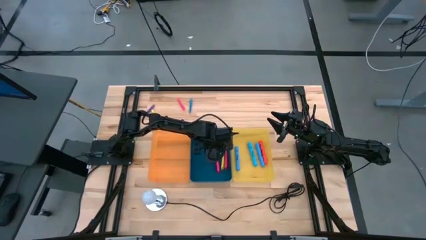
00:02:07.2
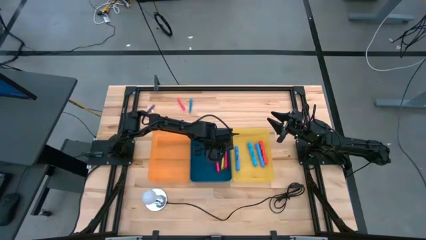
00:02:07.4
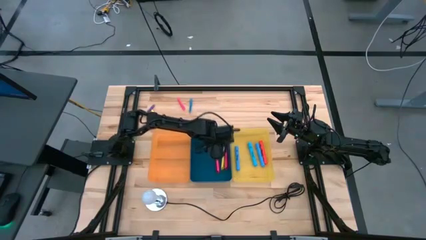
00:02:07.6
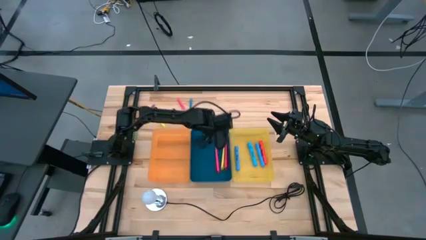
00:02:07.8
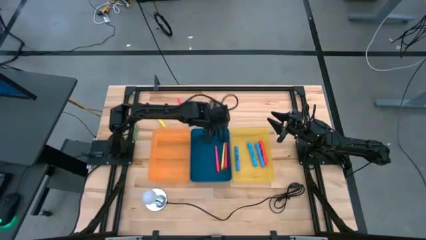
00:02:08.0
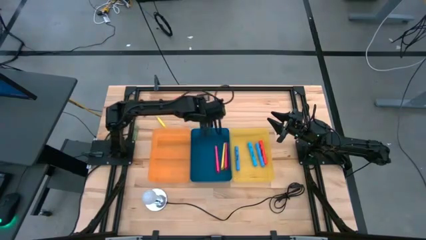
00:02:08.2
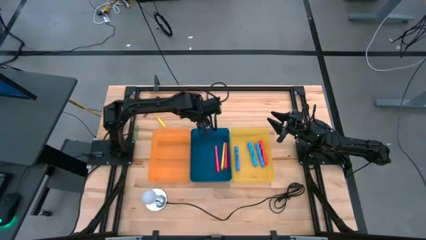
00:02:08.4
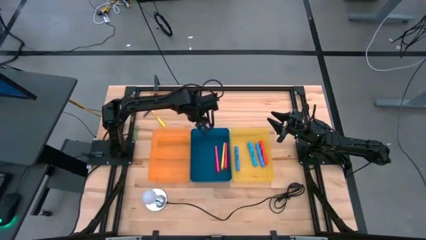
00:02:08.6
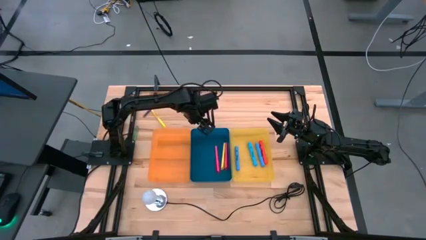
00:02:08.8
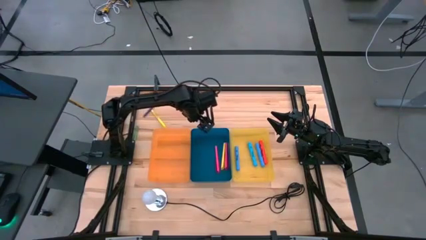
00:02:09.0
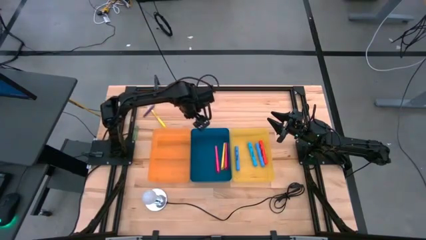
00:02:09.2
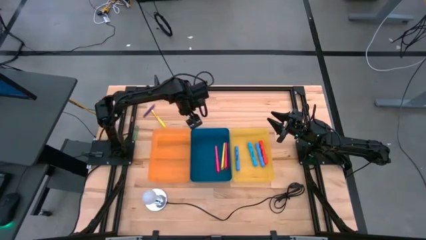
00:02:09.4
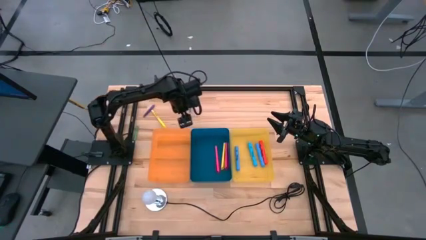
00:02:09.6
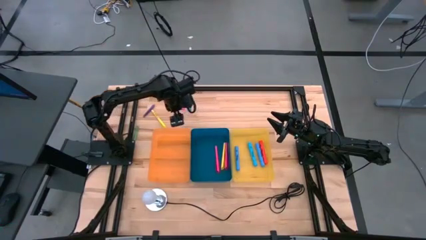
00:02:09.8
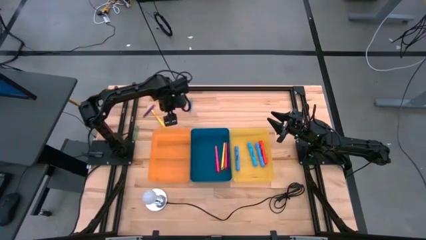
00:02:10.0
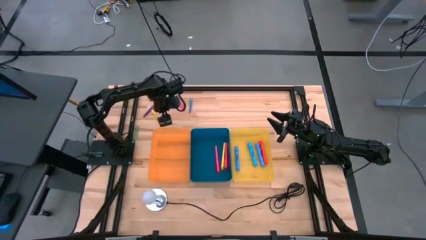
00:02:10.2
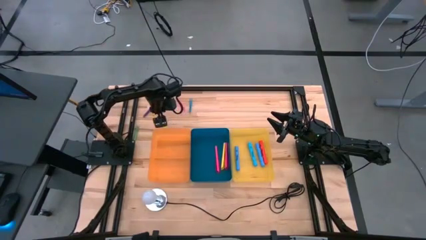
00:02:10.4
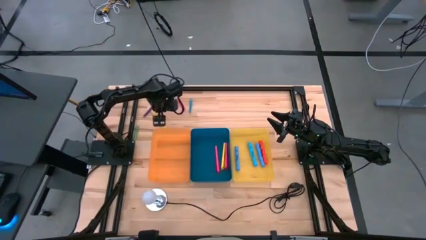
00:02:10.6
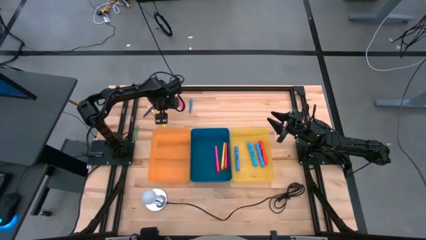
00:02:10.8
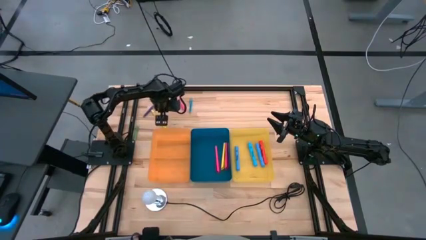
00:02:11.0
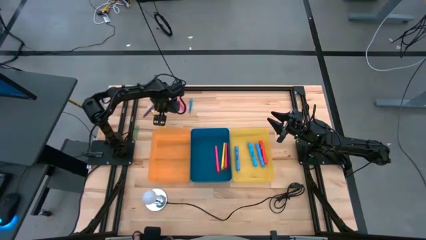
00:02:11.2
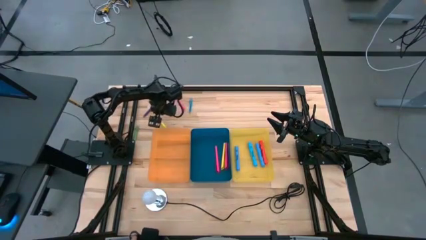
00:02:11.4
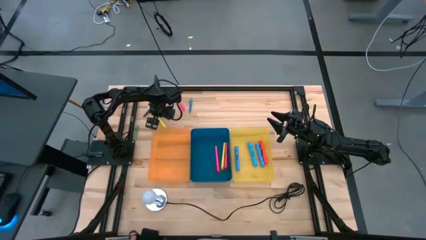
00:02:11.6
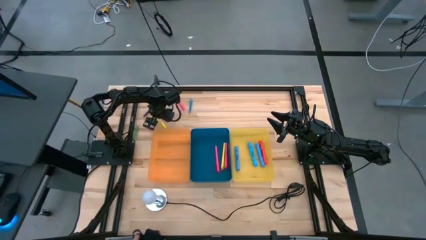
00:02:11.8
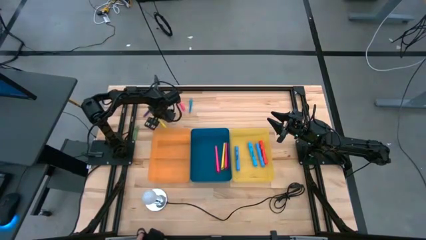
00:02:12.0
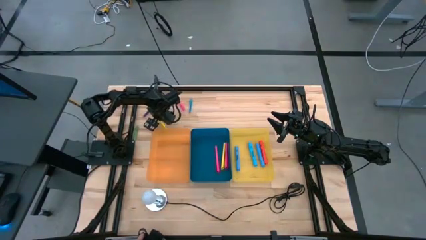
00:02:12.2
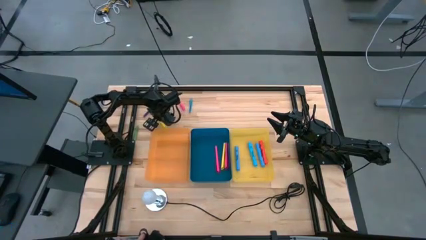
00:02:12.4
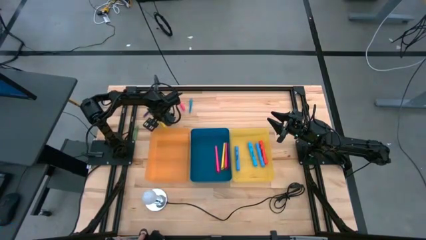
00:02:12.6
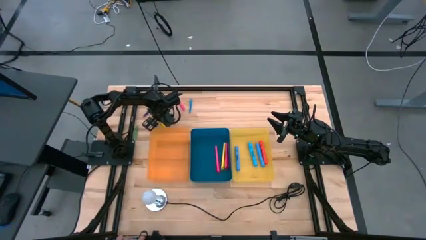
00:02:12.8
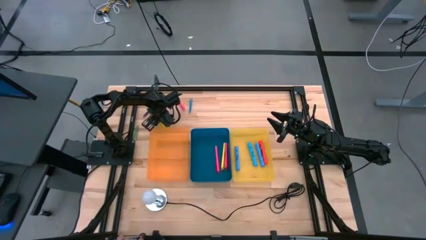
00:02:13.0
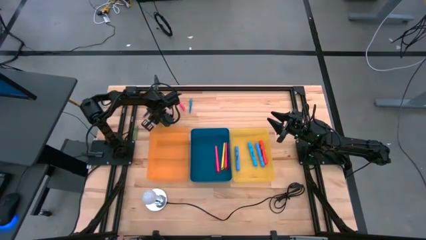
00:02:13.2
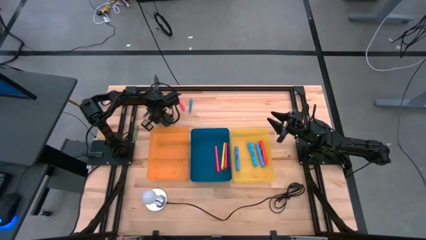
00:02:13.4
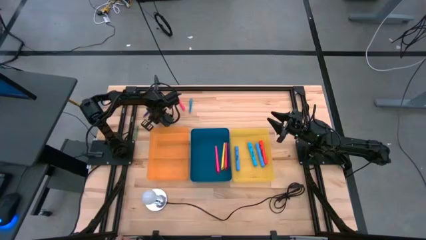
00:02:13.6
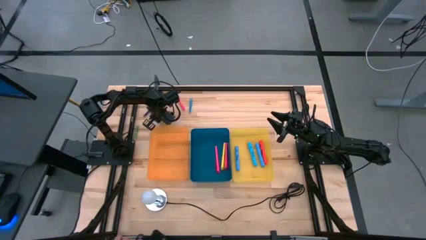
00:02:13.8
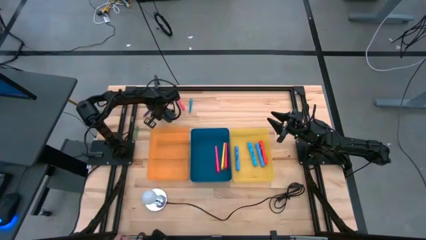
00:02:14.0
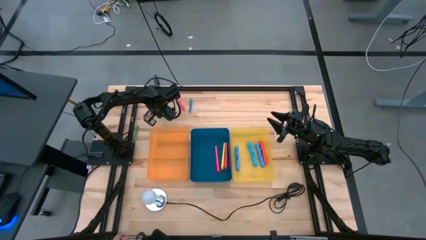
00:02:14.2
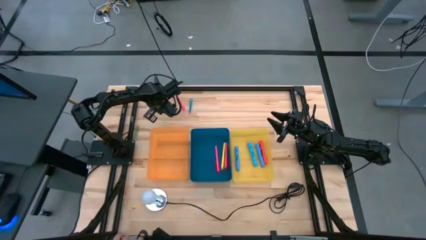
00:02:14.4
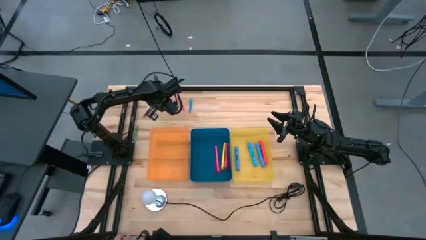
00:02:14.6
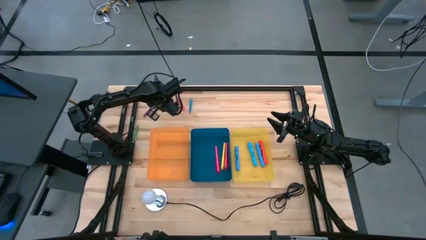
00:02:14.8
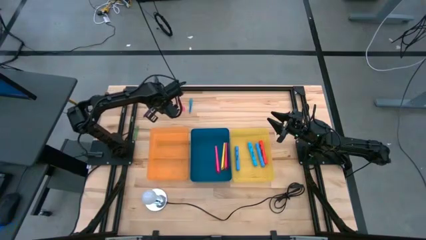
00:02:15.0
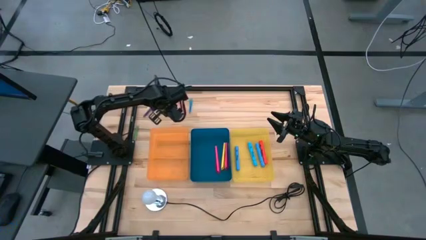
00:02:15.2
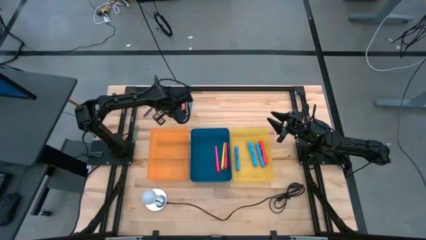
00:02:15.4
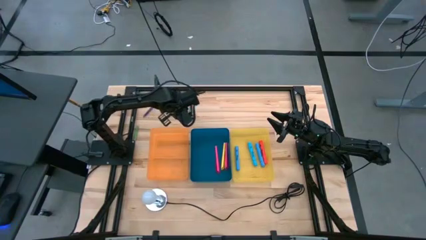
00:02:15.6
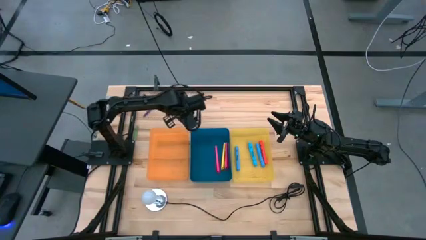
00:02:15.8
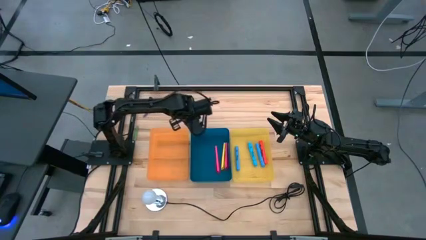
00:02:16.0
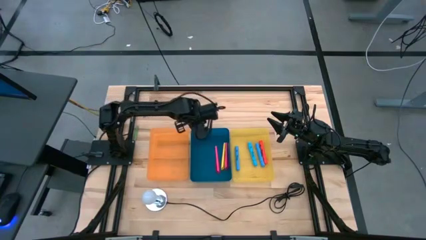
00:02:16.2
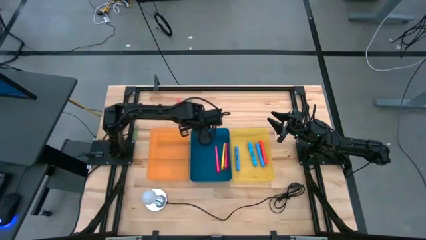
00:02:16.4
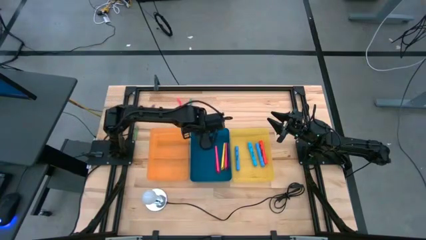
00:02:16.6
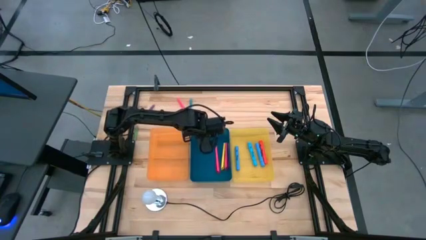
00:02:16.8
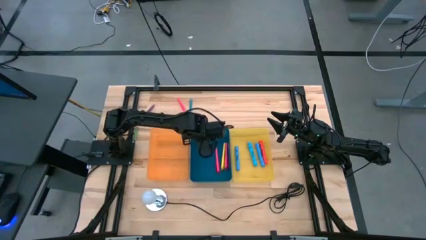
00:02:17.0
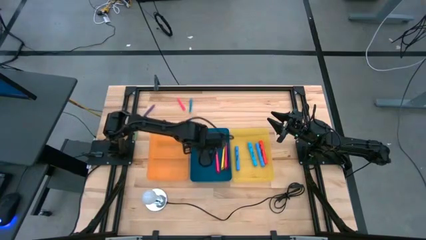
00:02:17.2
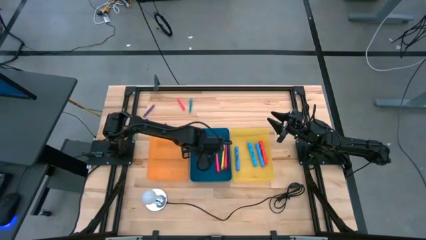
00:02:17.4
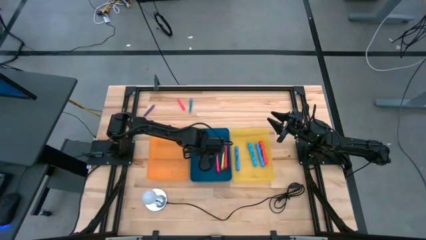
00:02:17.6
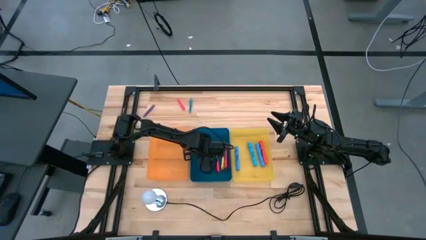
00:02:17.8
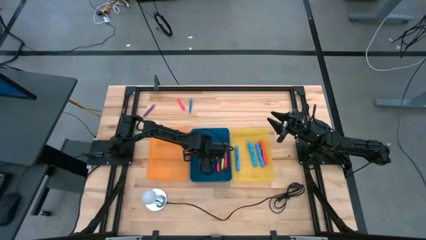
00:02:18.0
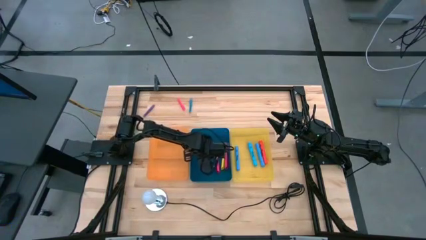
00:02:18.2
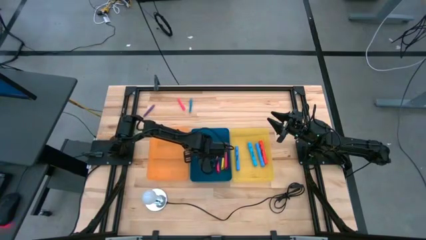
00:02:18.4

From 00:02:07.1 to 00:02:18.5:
Task: Pick & Place Markers
Put the yellow pen into the blue bin

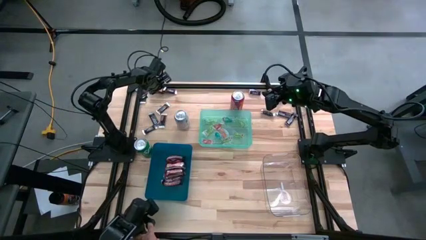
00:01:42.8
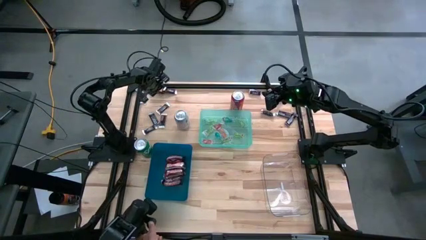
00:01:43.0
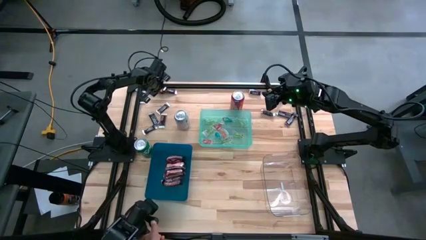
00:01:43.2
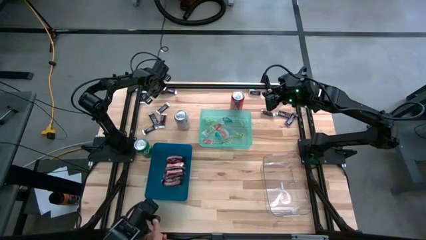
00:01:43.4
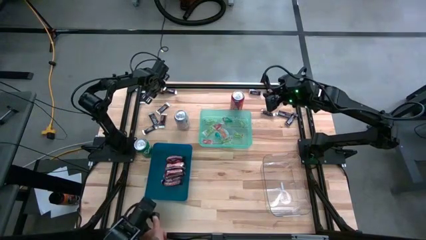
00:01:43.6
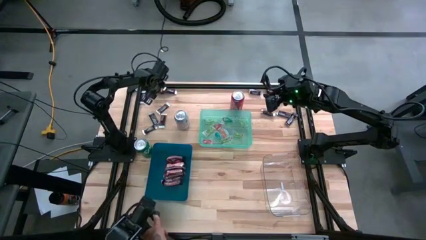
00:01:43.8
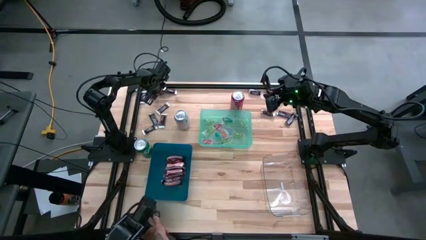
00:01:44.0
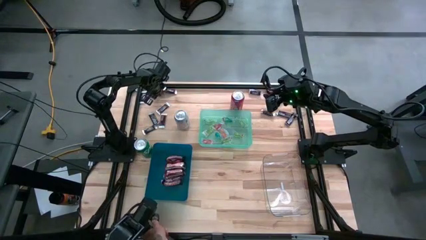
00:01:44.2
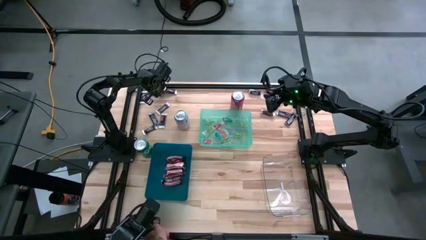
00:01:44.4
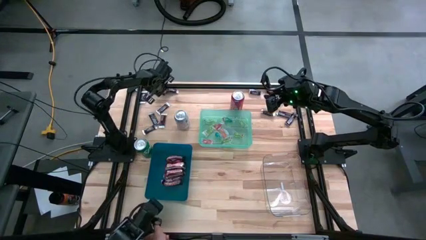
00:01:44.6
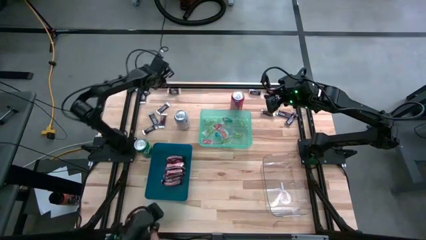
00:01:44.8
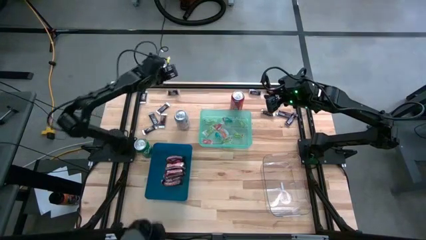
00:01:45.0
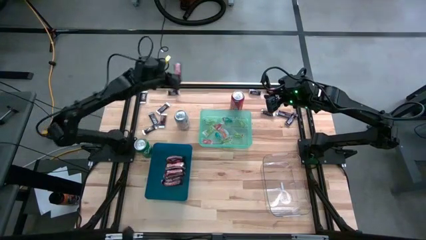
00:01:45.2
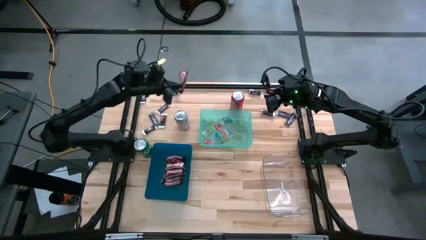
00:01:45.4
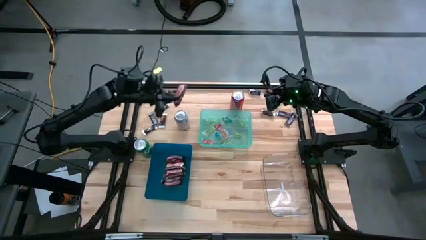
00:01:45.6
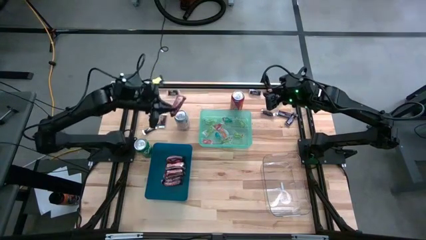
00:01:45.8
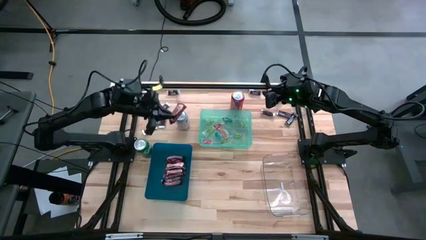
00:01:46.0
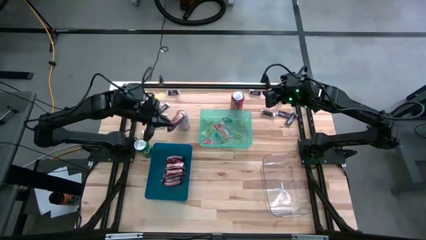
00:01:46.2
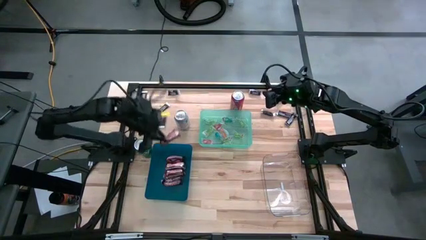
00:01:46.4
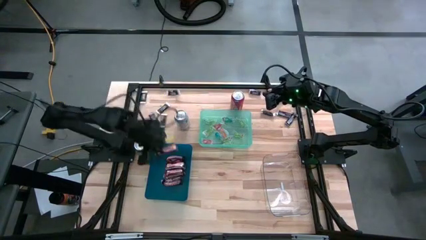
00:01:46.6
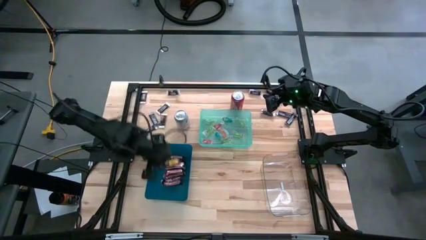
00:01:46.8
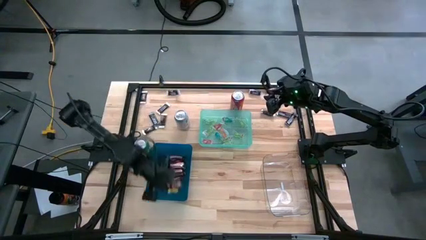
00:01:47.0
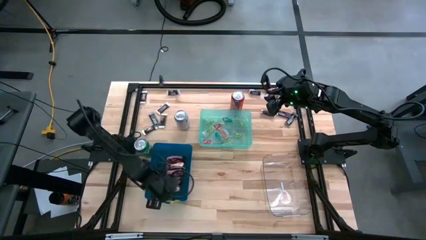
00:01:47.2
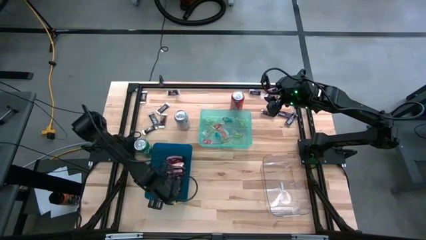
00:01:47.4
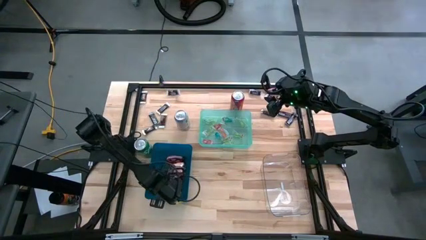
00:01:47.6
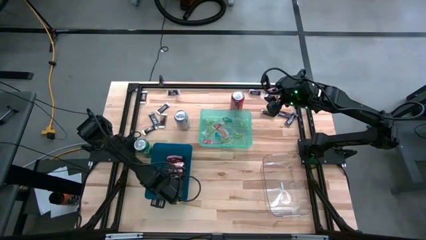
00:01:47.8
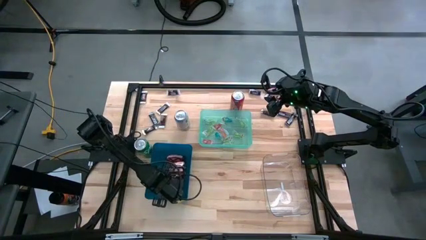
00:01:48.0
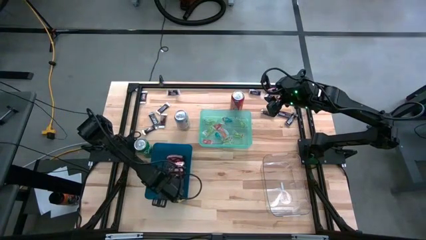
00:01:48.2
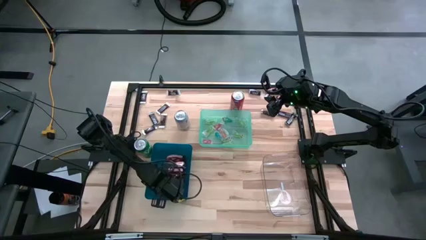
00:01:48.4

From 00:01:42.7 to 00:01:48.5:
Task: Organize candy in baskets
Put the brown red chocolate into the blue bin
